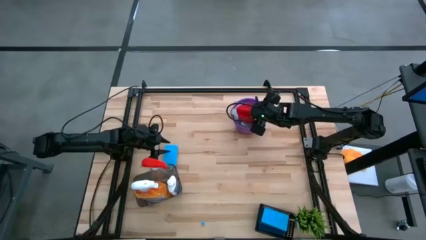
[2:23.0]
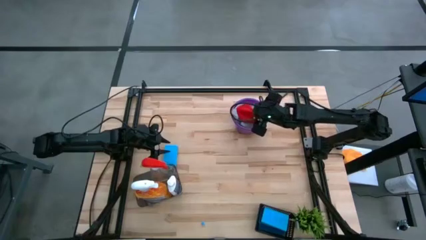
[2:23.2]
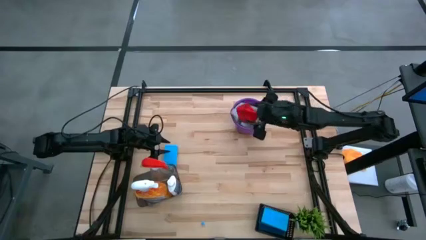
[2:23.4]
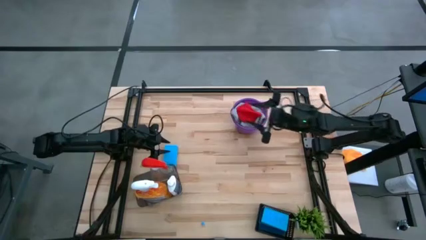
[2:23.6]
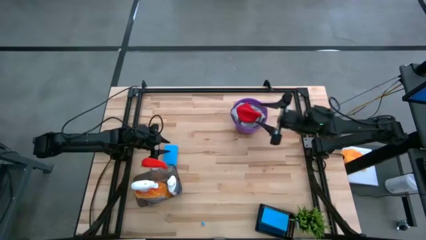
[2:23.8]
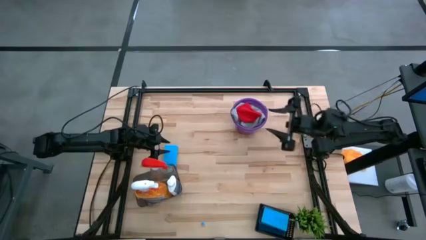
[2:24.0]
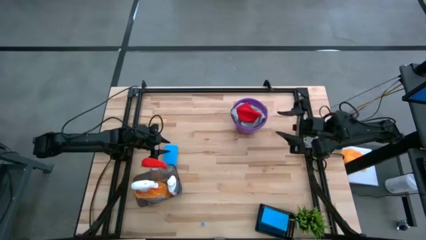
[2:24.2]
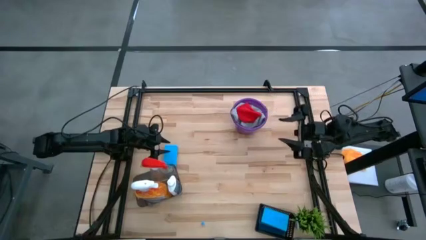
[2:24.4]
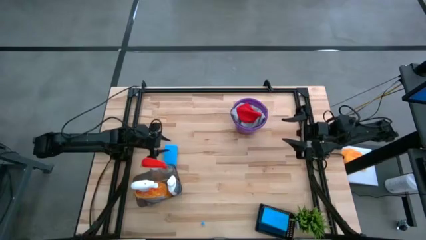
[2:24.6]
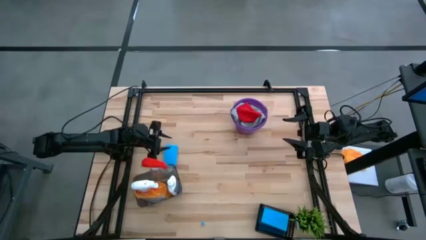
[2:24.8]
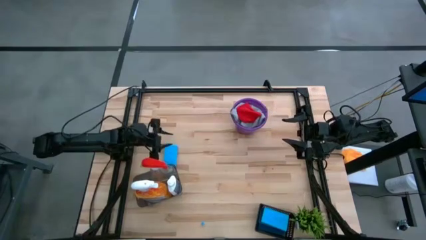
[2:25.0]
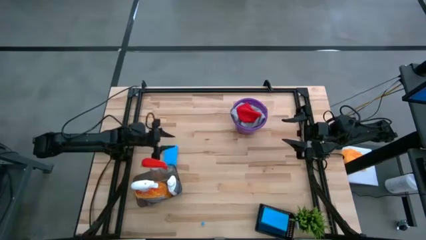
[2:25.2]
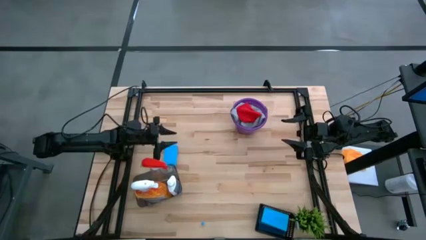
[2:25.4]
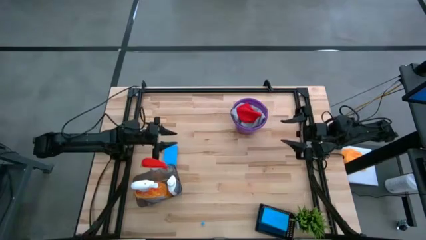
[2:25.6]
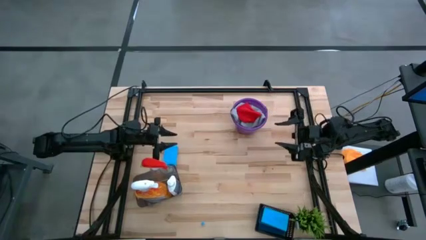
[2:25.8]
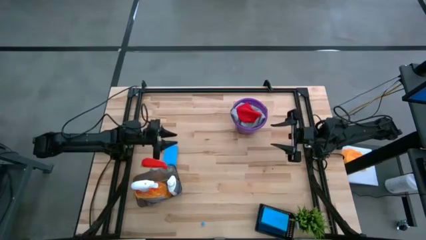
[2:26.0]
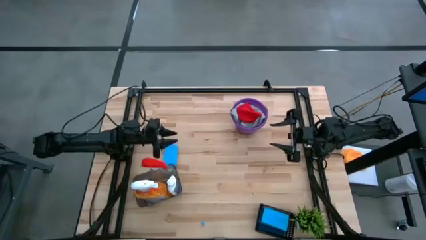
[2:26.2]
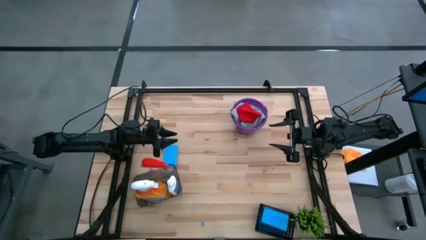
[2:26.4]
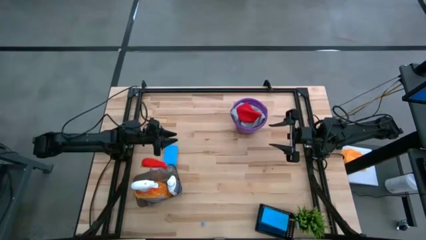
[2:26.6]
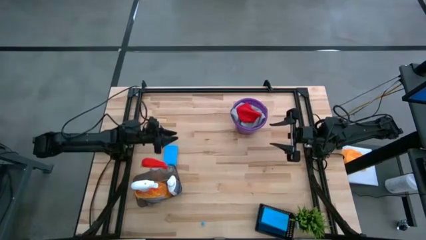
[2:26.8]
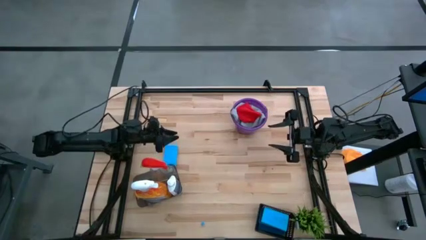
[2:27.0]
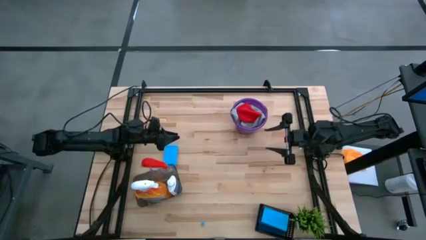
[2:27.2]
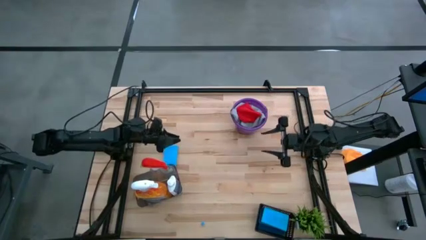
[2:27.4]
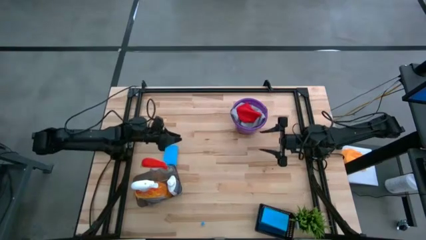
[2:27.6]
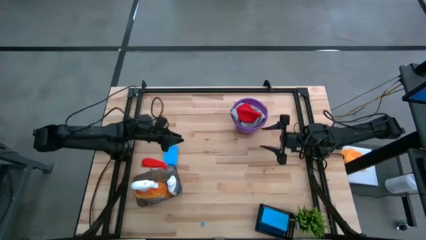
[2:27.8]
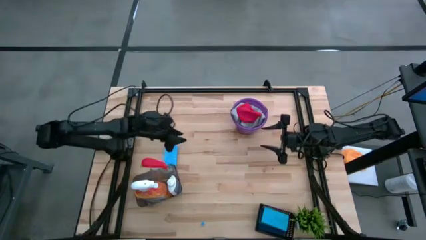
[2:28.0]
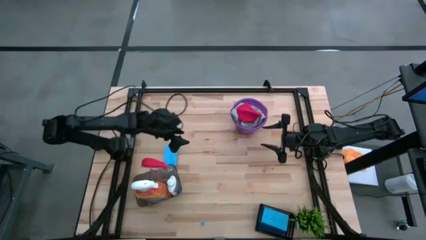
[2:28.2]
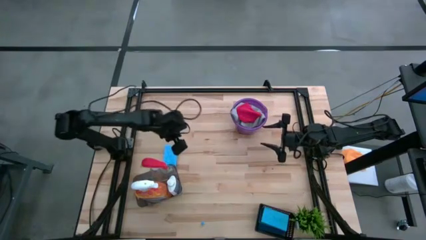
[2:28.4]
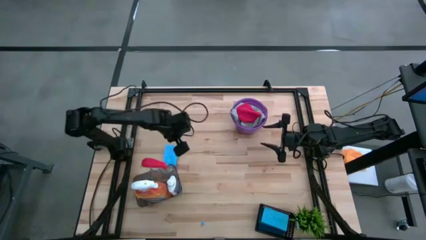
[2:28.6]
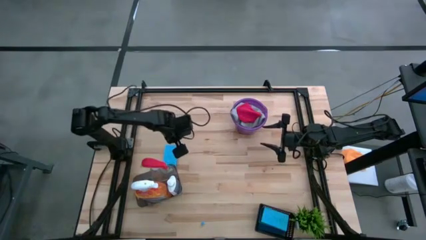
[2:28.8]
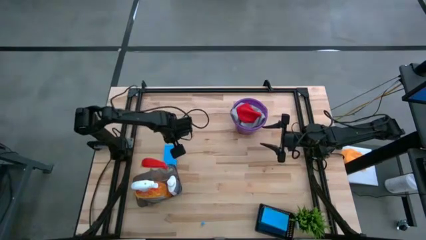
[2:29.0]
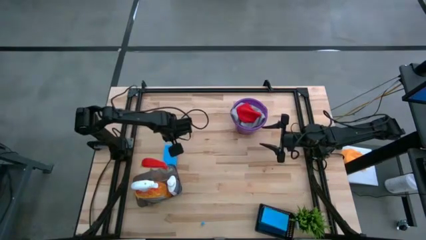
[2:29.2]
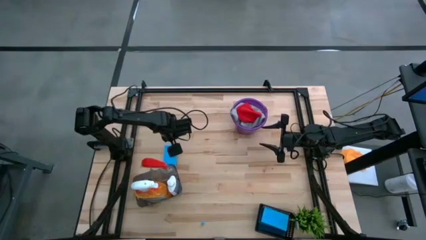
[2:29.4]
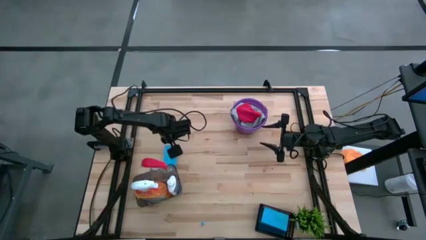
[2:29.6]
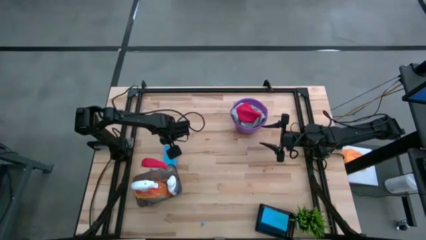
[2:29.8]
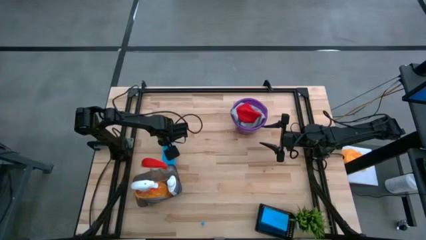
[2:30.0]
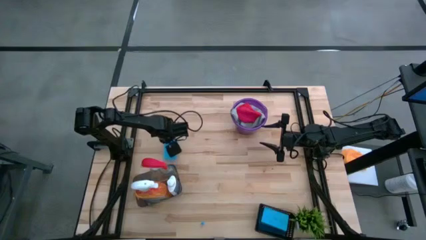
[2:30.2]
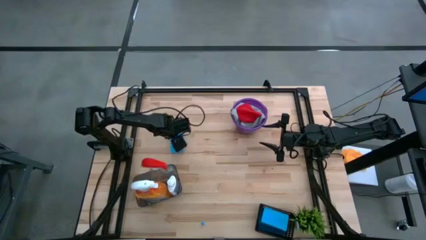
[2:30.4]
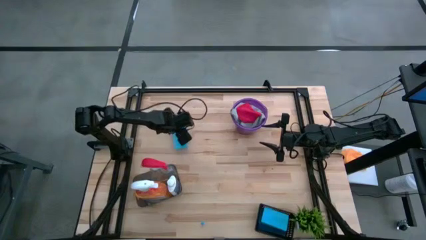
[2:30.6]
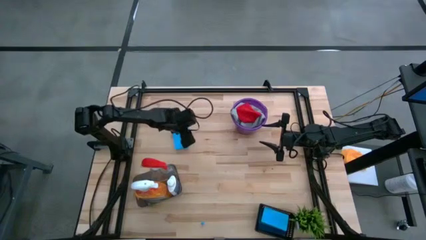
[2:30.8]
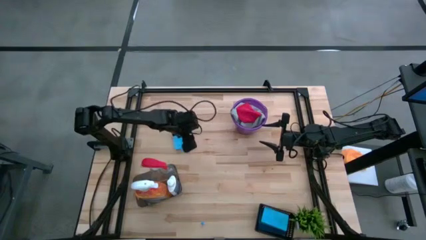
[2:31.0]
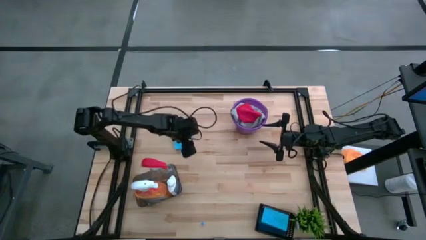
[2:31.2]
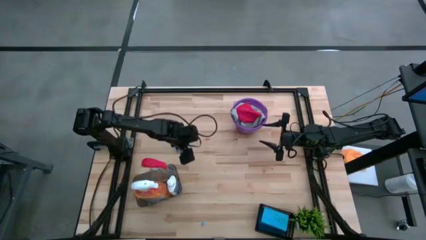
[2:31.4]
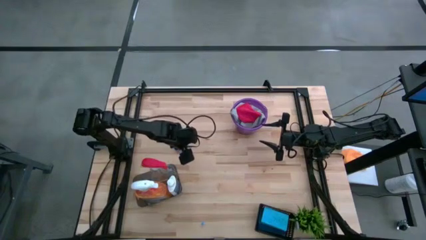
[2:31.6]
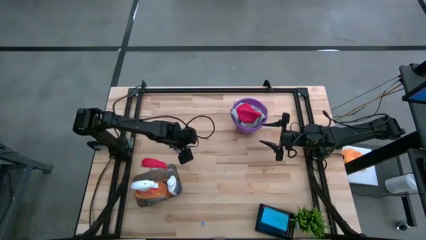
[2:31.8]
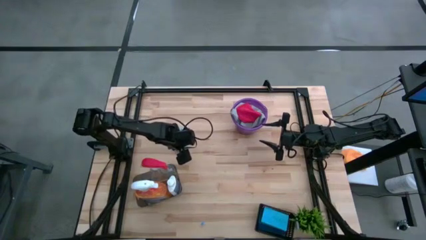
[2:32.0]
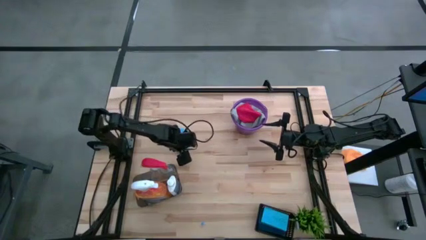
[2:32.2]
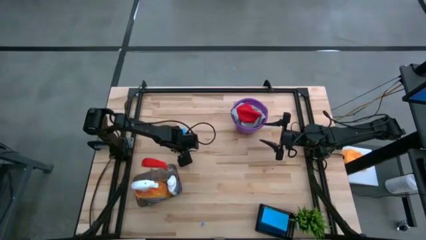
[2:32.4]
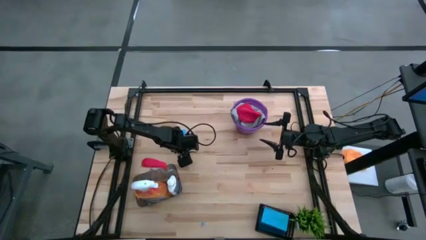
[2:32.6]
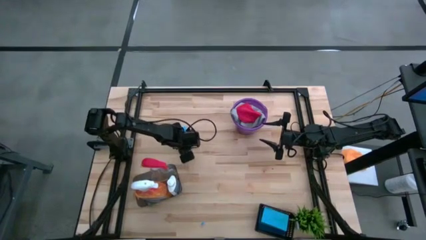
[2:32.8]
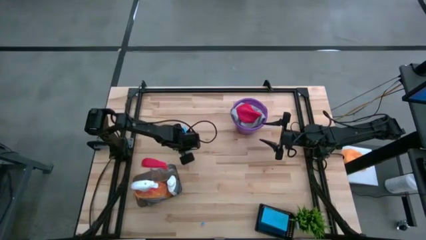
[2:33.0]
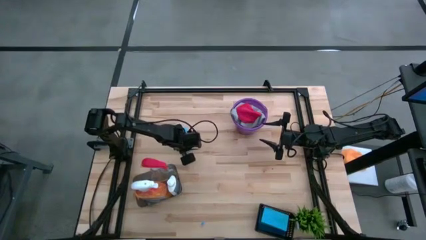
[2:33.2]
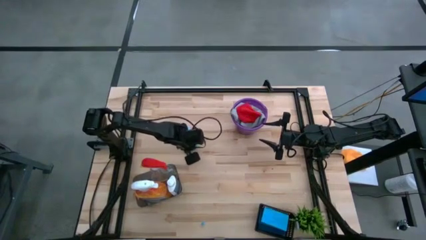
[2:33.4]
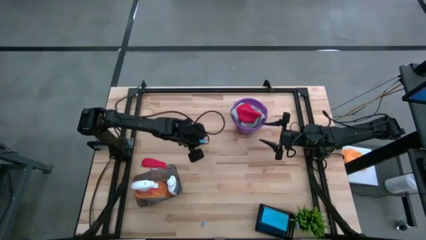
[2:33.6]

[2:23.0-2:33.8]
Task: Pick & Place Kitchen Items
Put the light blue sponge into the black bin
